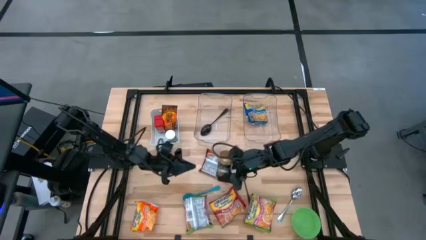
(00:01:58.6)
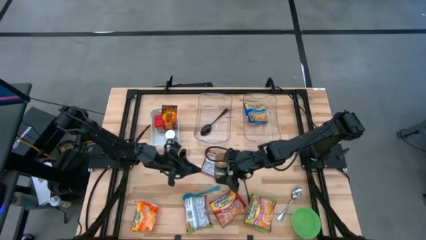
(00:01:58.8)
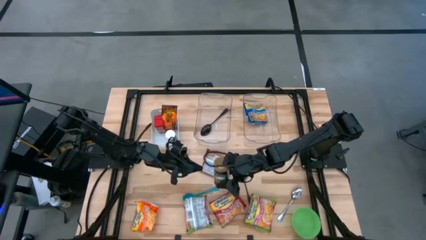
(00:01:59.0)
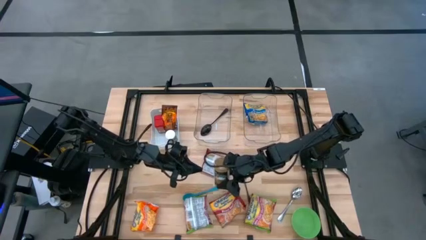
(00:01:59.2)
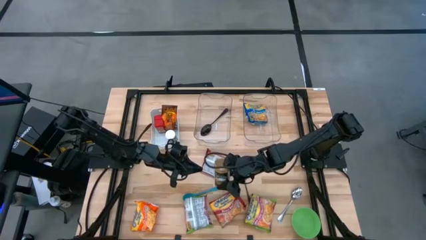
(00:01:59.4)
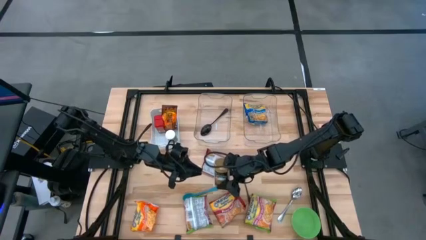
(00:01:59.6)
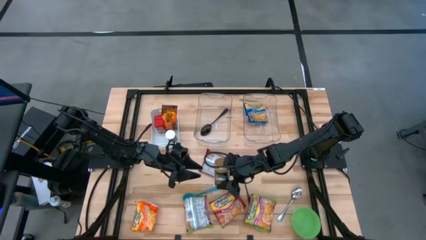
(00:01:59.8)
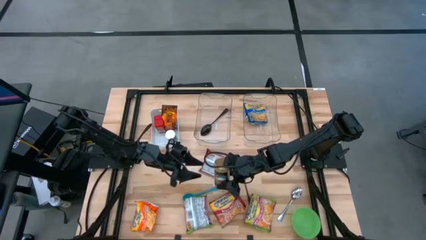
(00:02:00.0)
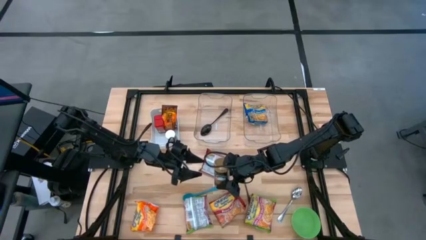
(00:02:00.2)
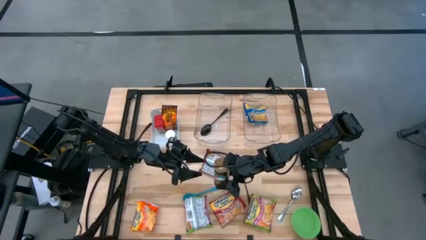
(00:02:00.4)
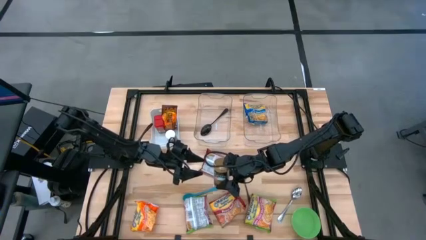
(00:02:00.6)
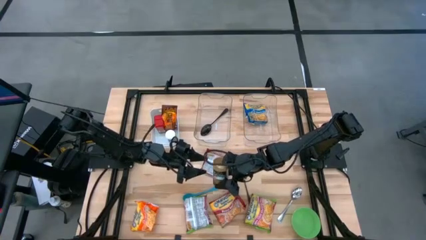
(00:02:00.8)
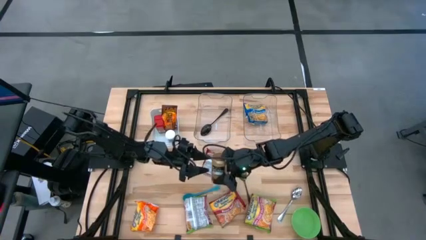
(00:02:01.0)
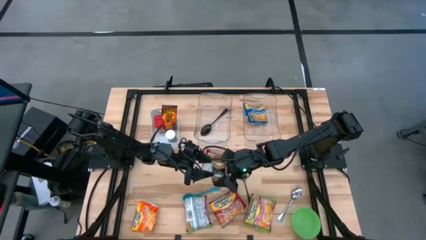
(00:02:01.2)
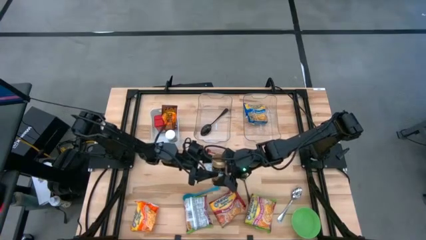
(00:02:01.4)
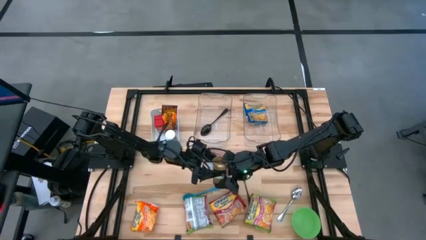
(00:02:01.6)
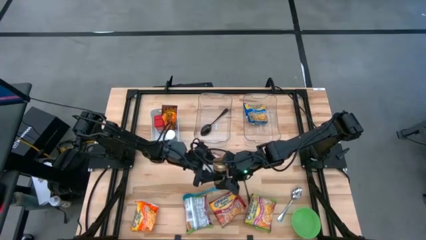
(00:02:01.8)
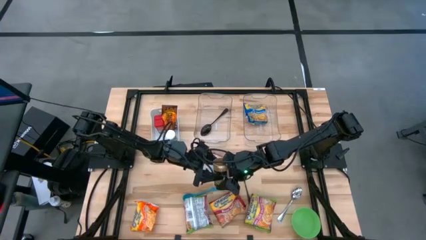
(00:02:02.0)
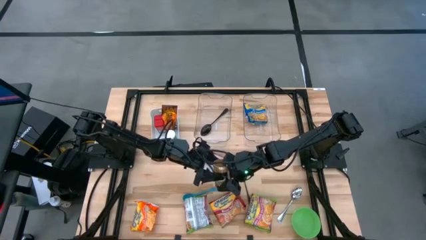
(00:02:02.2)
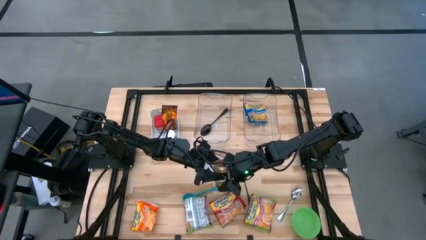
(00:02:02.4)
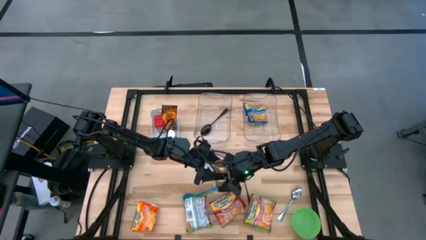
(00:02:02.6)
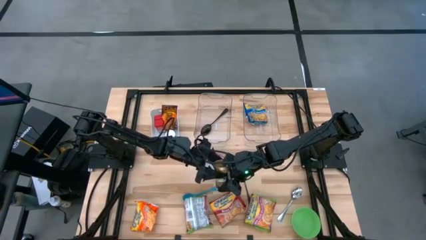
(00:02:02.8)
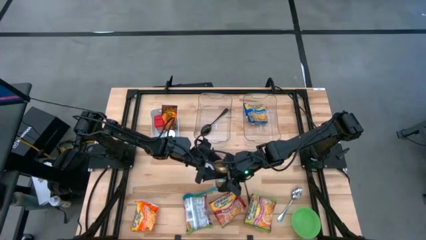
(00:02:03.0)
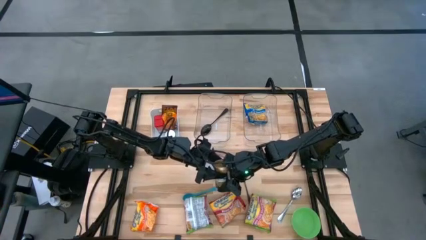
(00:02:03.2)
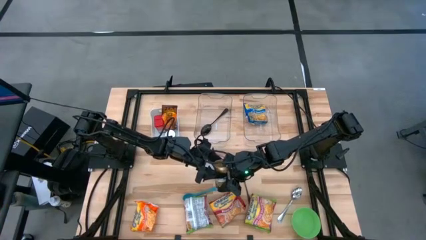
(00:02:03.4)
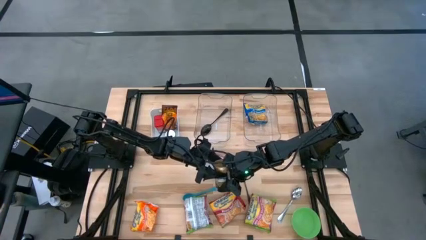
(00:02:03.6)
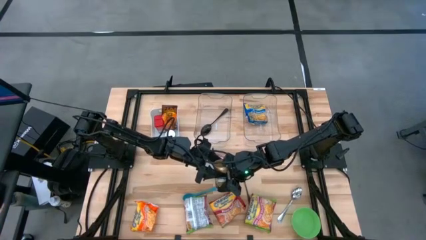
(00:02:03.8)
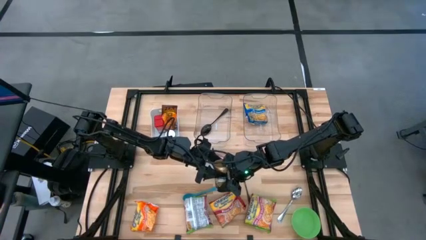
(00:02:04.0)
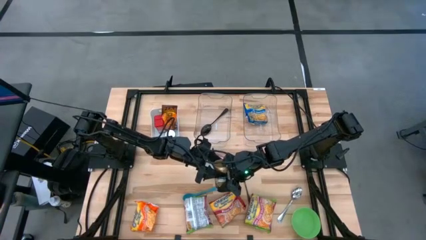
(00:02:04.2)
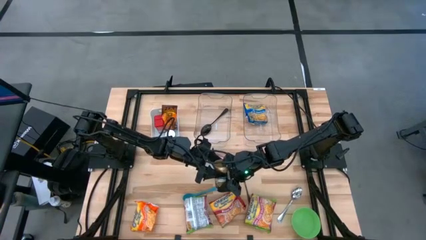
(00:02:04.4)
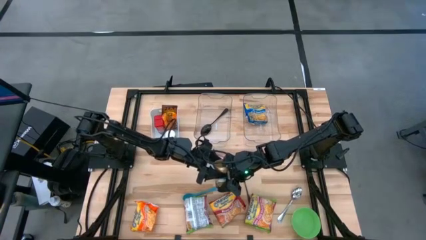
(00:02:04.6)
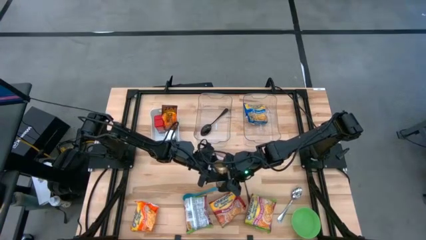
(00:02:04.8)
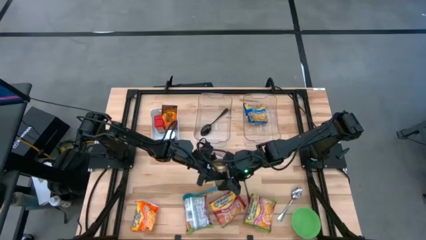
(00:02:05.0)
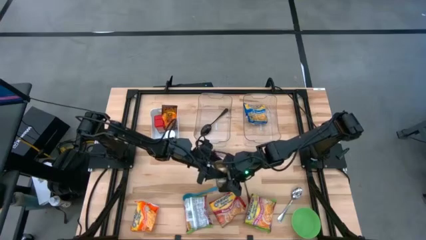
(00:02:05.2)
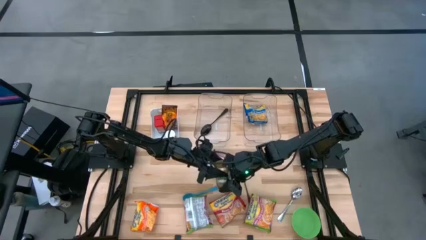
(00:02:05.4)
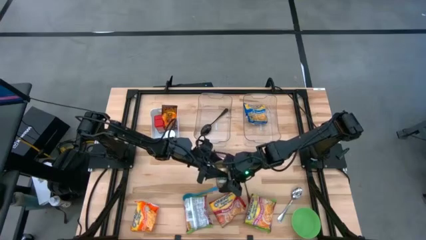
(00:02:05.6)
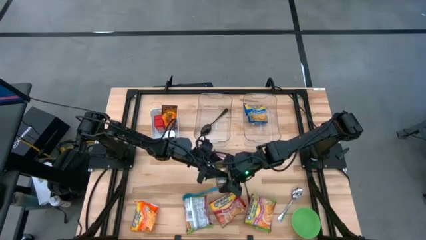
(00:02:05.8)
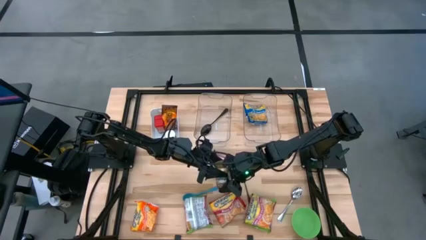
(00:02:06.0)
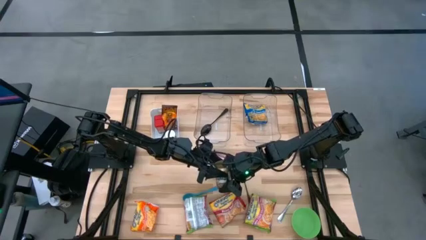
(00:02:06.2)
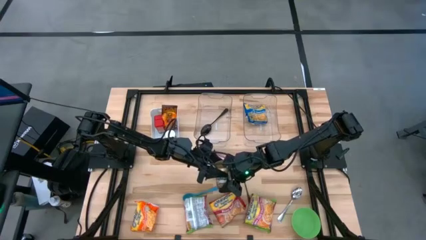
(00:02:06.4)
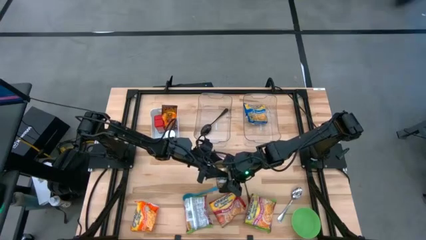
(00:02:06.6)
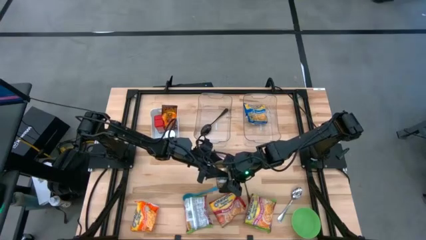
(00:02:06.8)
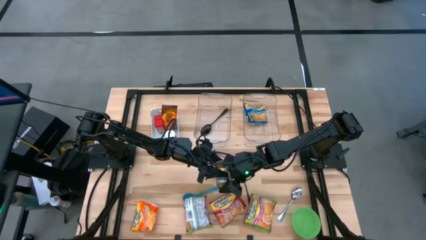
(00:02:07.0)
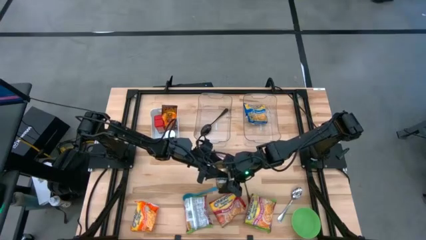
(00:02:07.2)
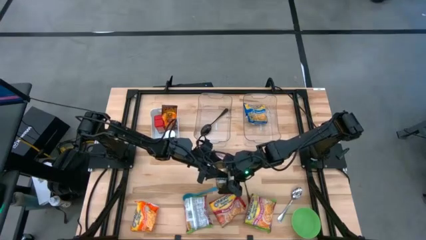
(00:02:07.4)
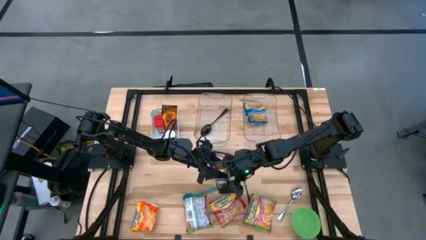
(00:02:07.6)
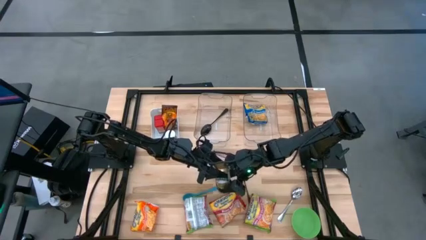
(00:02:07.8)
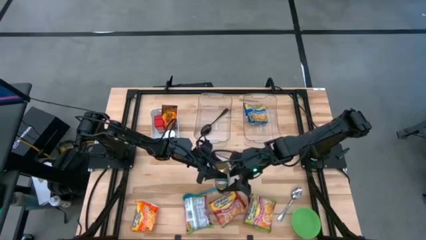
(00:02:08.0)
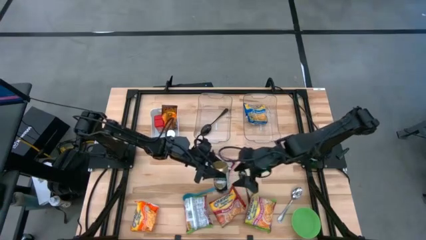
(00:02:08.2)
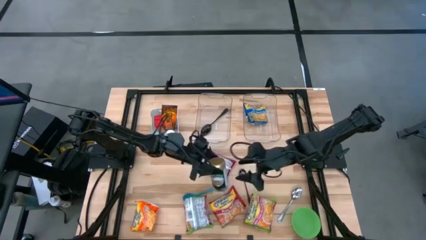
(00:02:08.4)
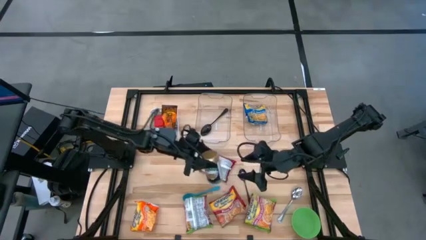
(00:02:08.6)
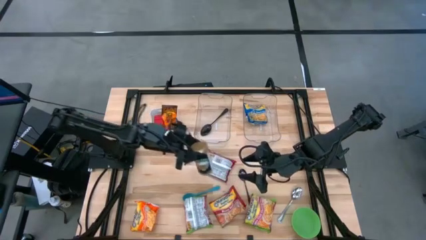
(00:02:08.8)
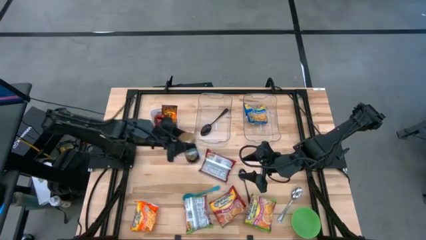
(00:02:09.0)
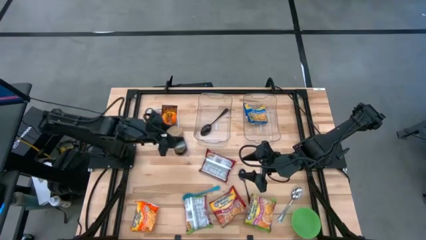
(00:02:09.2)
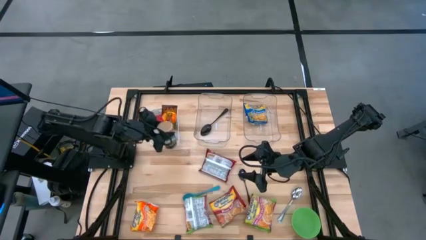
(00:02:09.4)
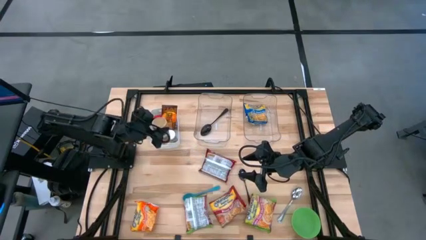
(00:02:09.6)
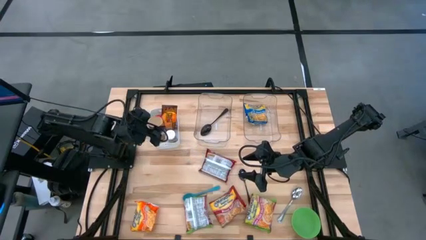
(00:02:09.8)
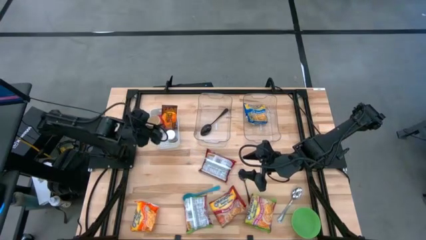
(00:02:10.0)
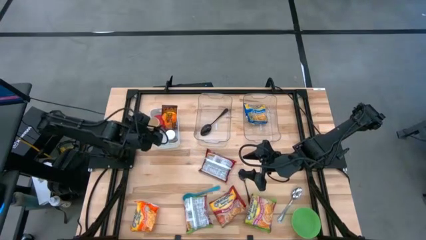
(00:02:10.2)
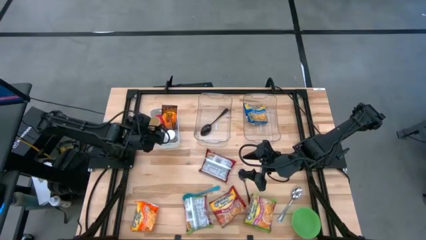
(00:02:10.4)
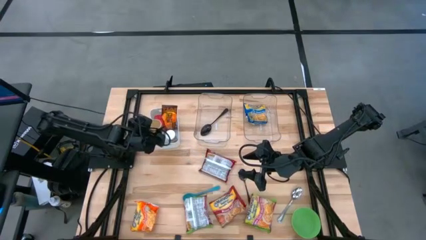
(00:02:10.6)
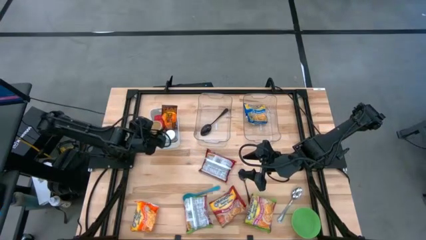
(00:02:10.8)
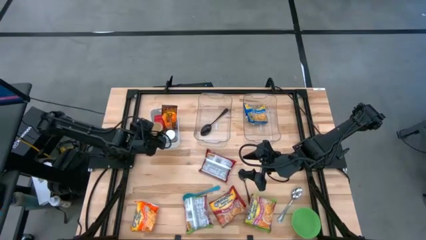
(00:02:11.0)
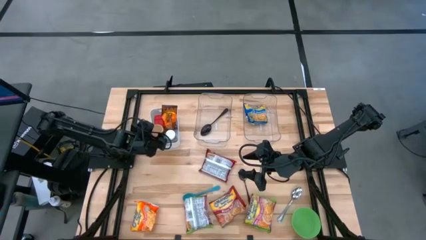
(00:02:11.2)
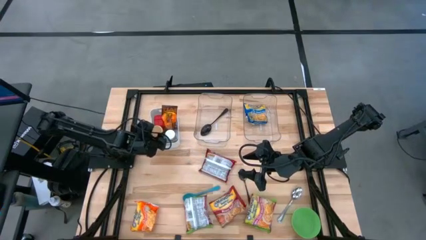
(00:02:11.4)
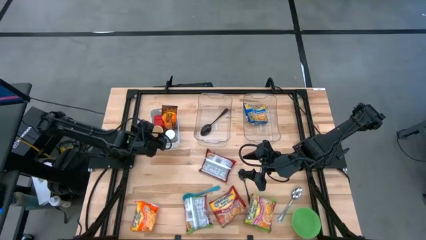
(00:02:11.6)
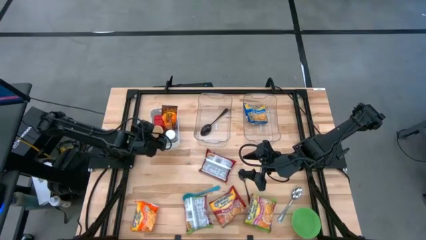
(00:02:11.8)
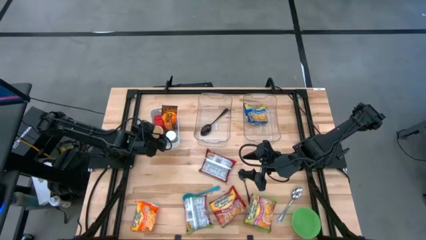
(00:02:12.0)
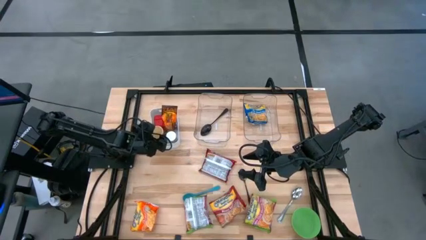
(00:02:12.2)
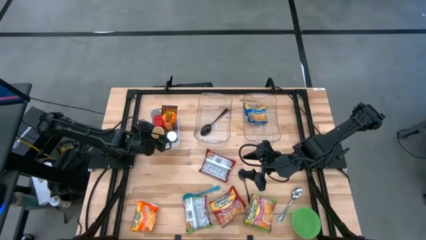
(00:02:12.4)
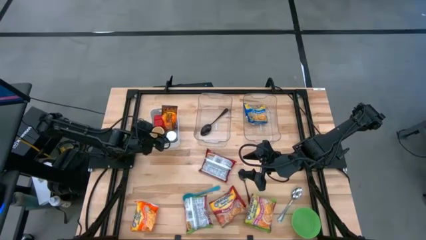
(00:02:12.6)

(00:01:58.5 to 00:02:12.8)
Task: Pick & Place Food Item
Put the gold seasoning bottle into the white bin
